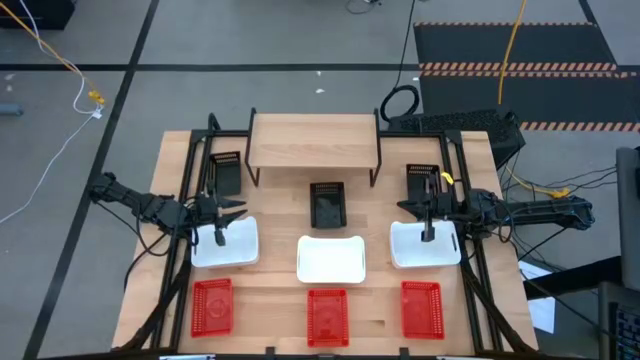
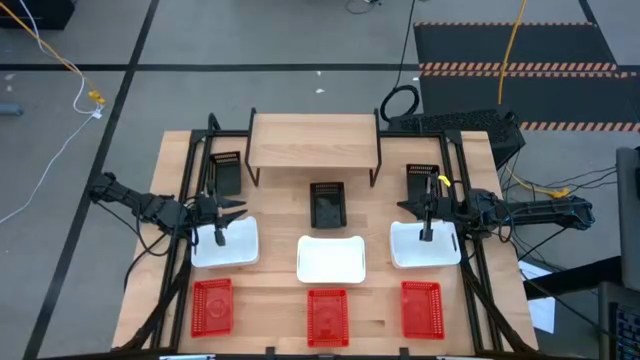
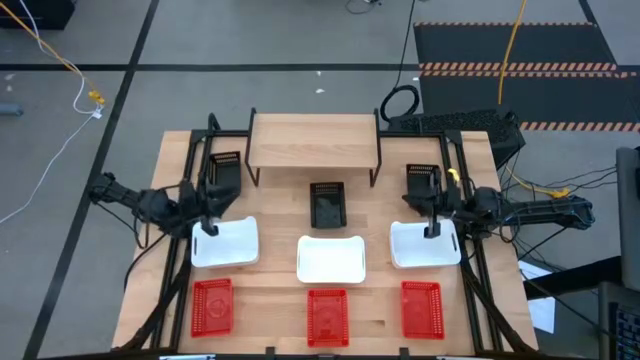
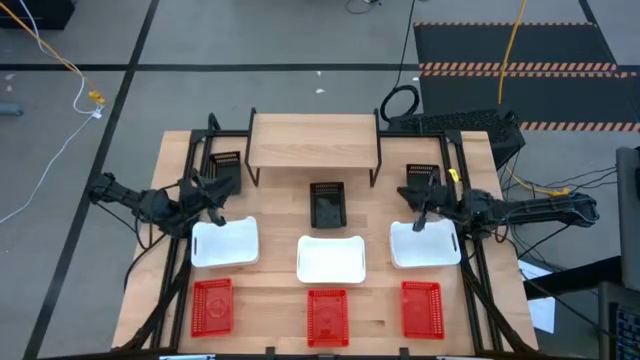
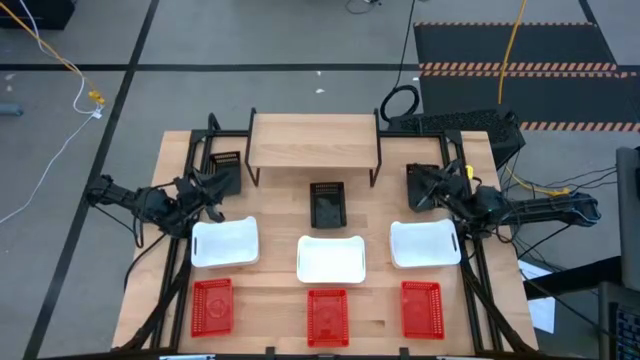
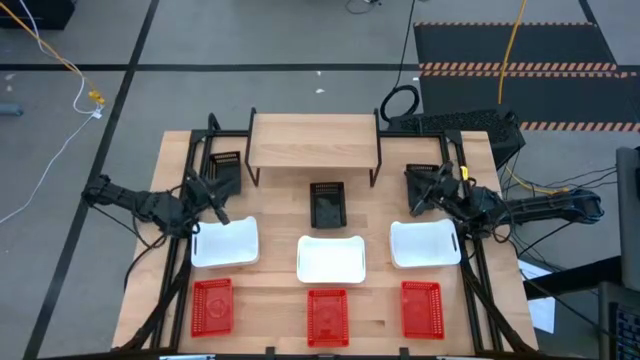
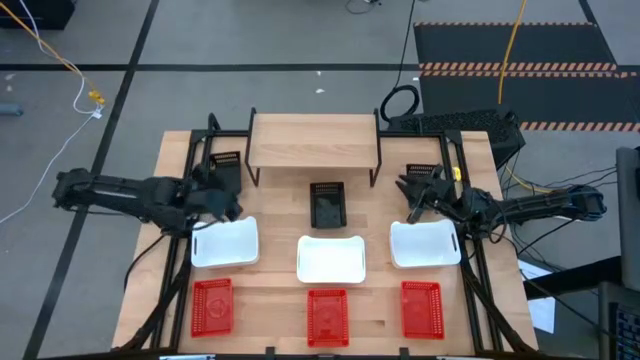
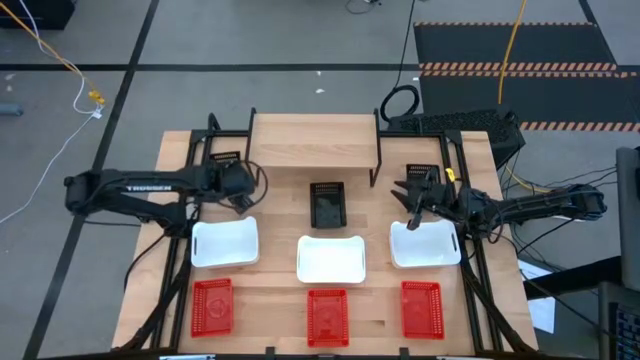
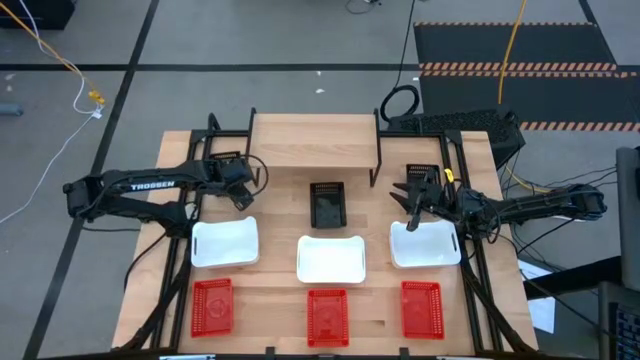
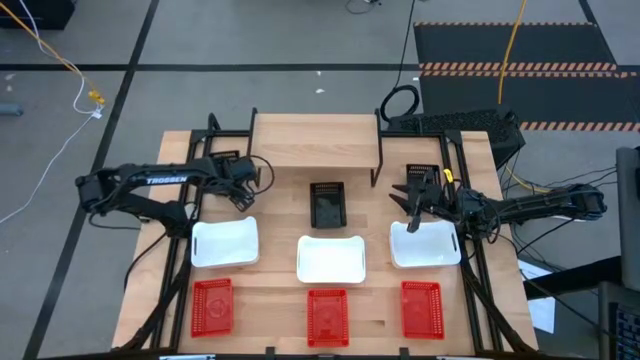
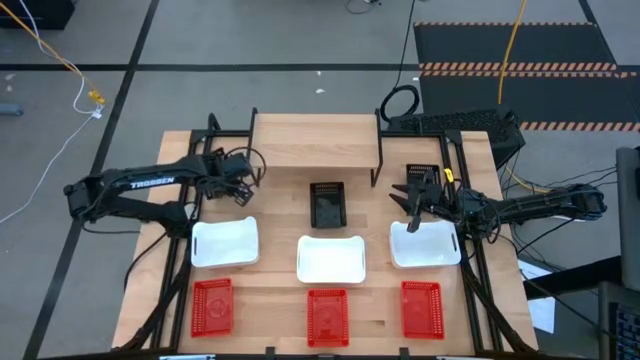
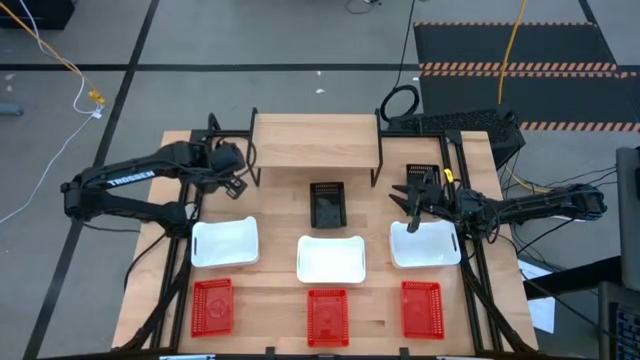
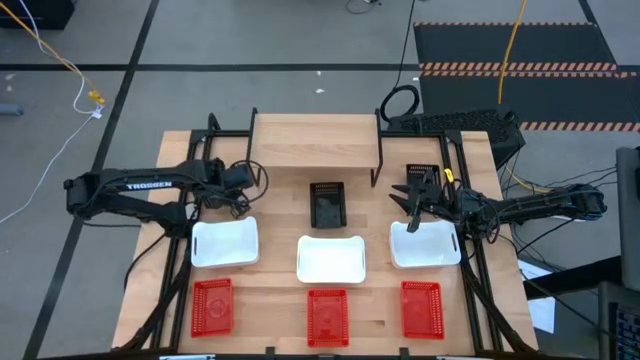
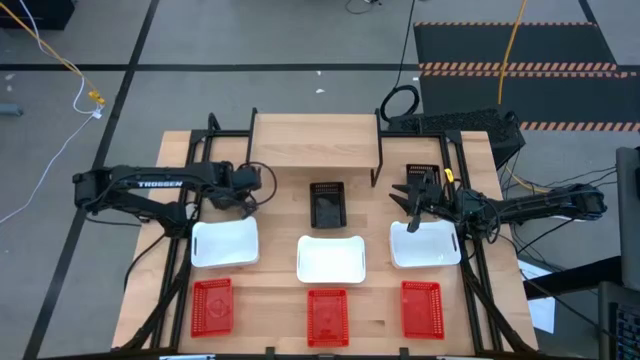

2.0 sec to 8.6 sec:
Task: Stack baskets on shelf by color
Put the left black bin on the shelf

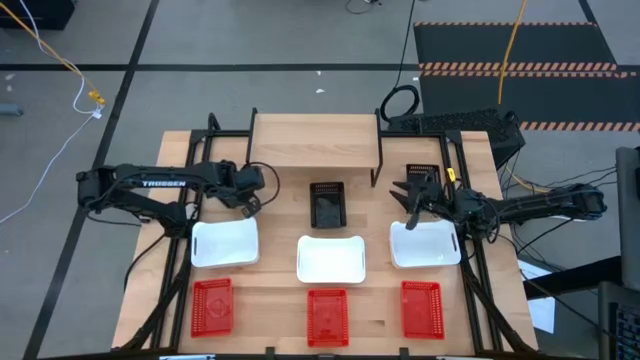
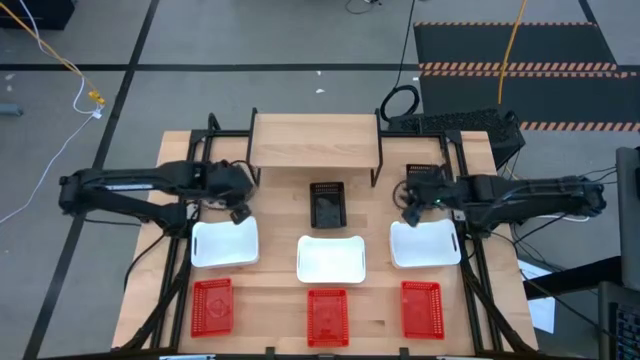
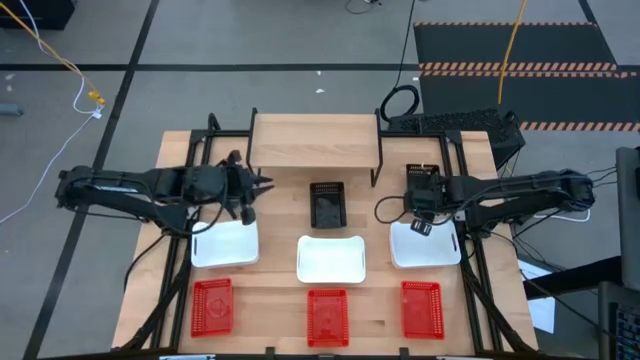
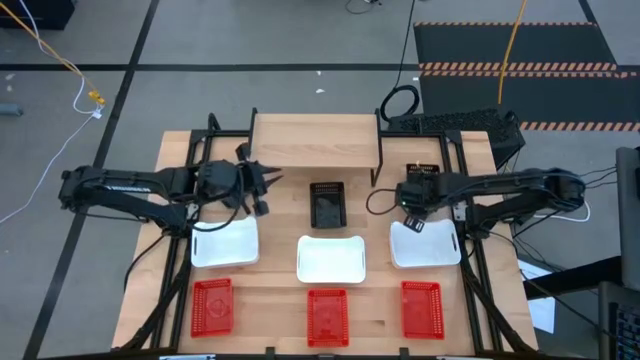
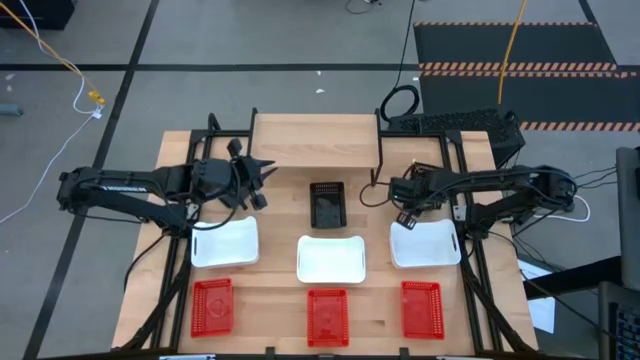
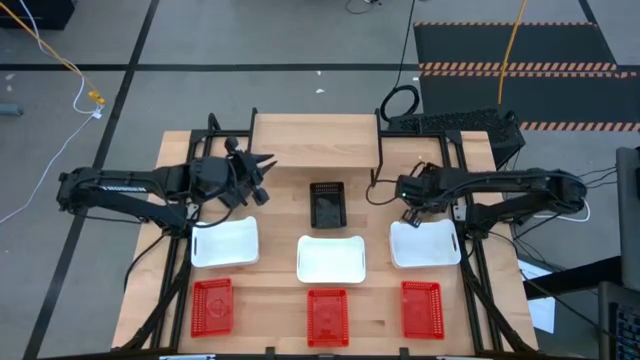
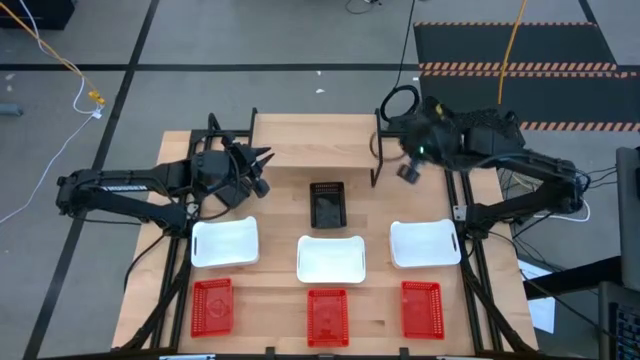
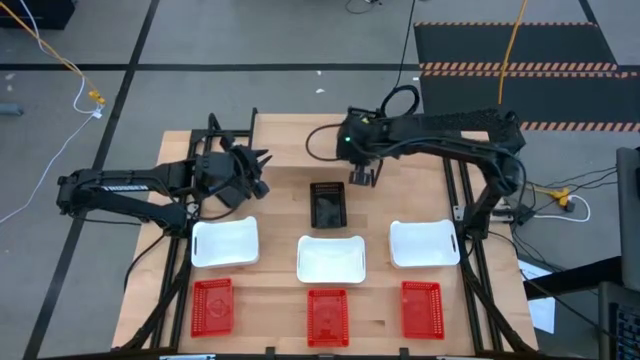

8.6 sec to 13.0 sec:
Put the right black bin on the shelf

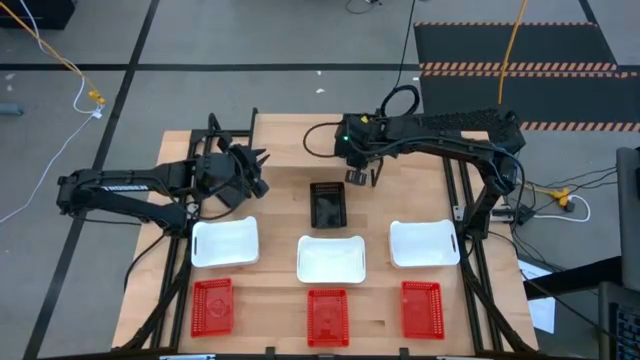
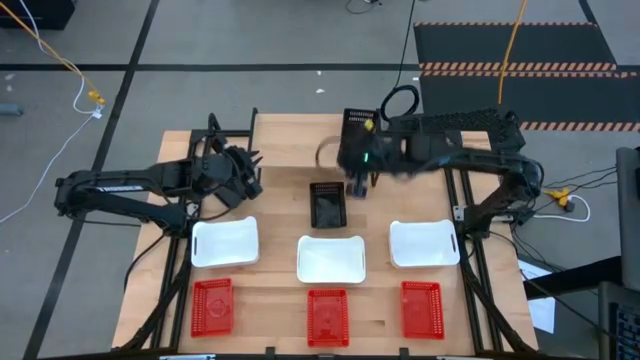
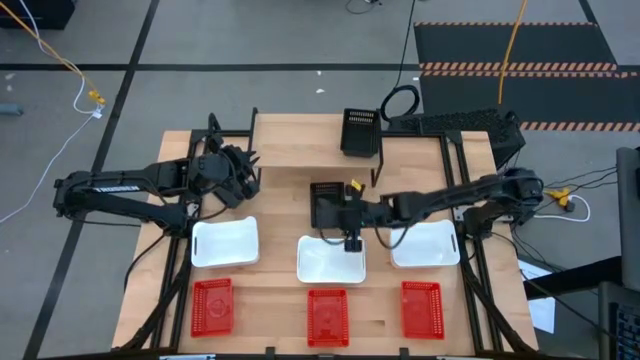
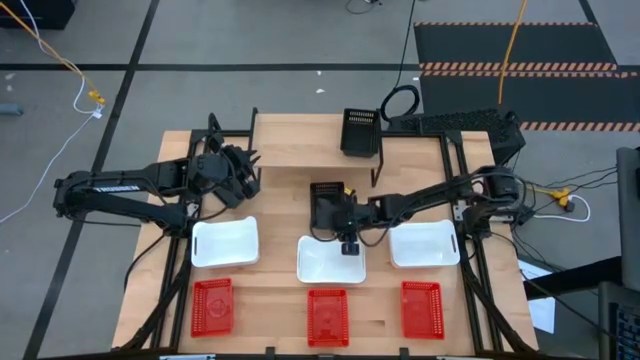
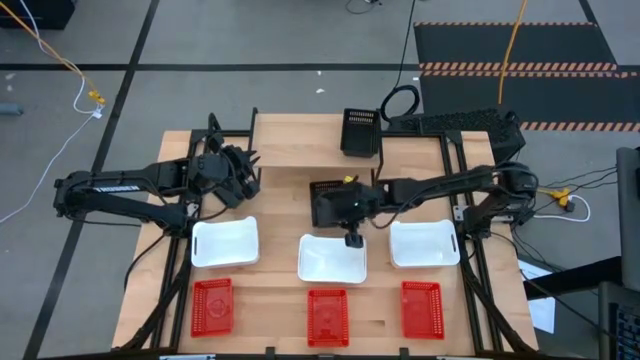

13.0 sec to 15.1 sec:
Stack the right black bin on the black bin on the shelf

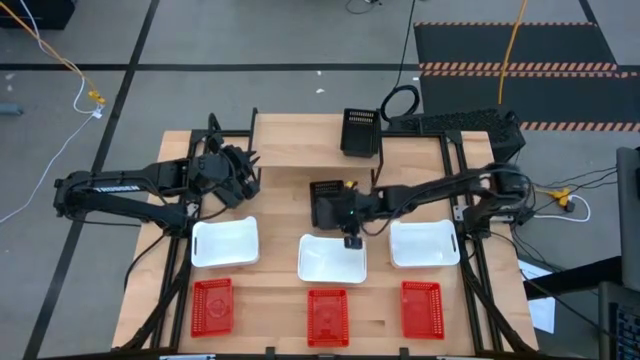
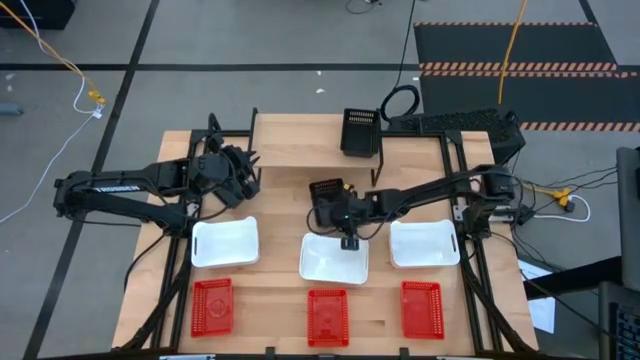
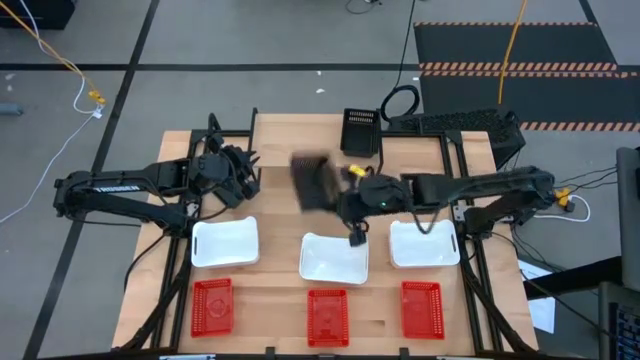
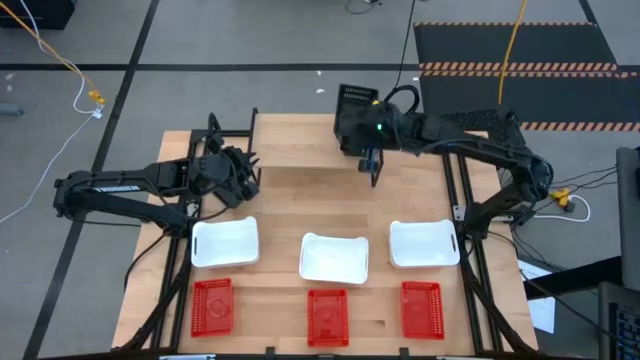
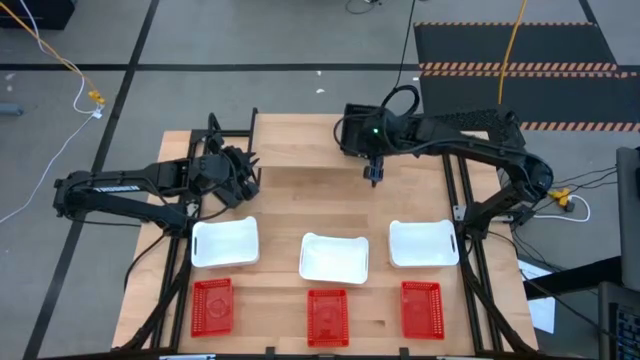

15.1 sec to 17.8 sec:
Stack the right black bin on the black bin on the shelf

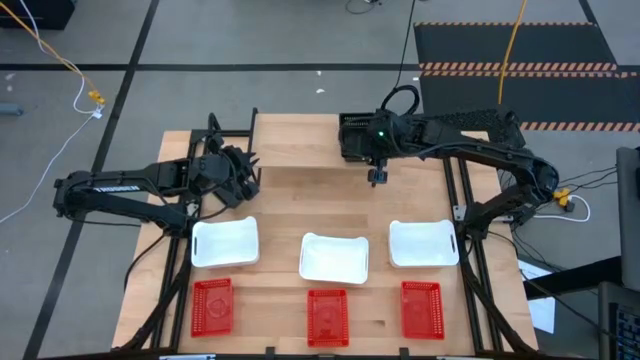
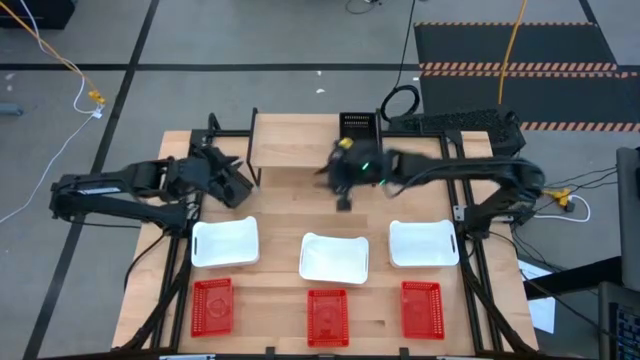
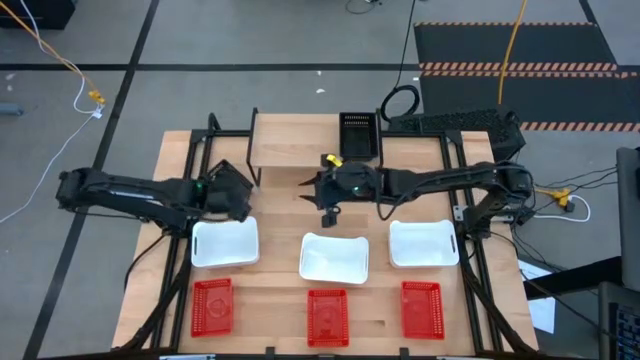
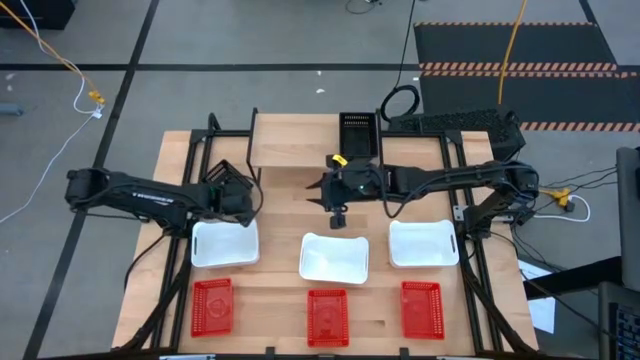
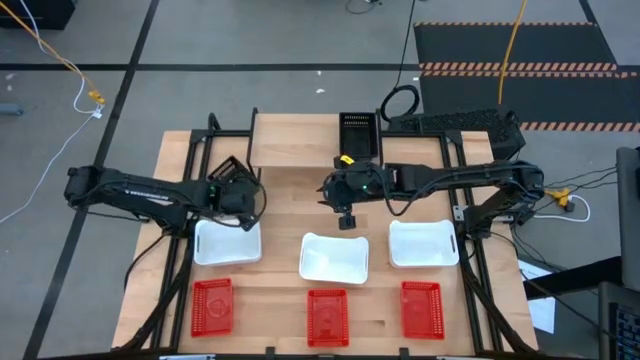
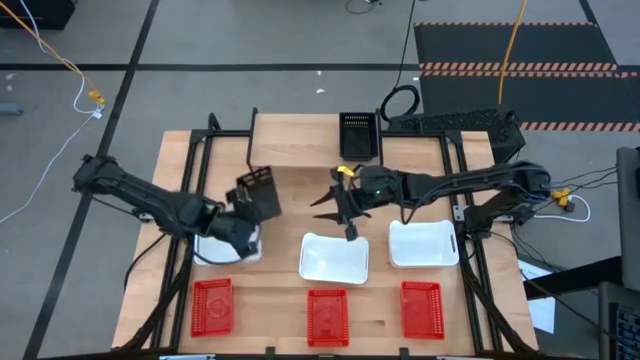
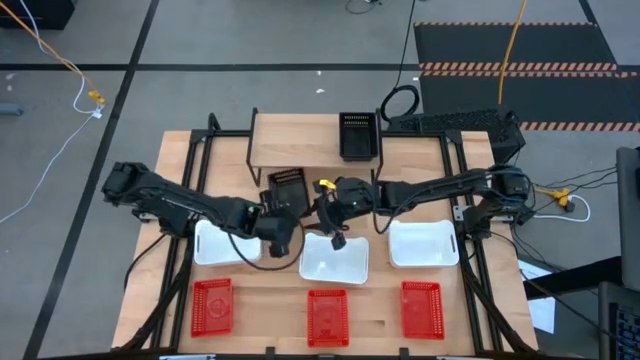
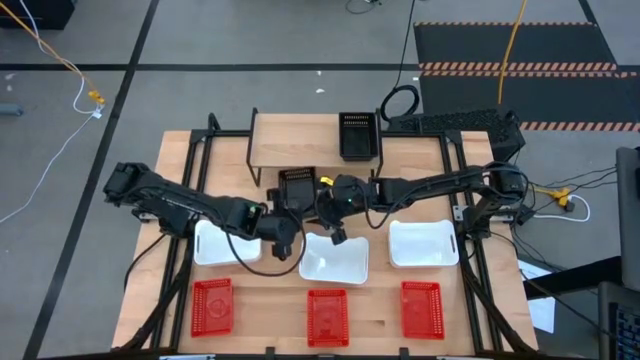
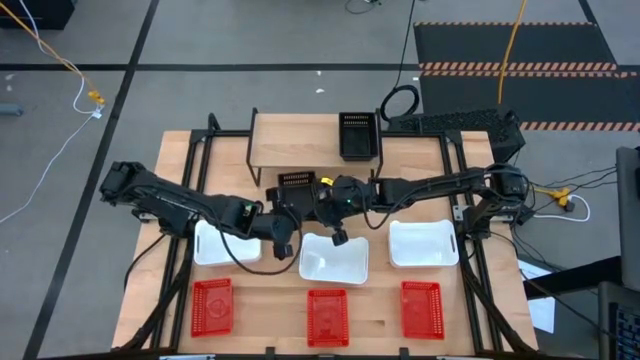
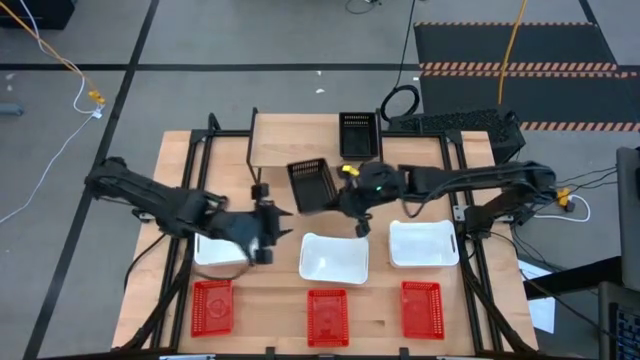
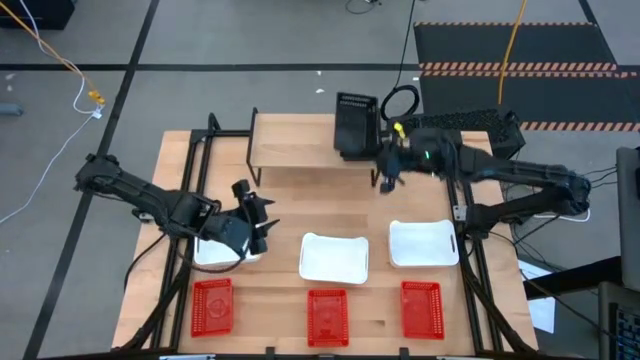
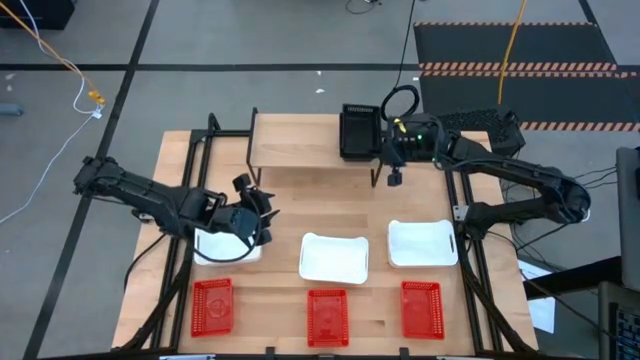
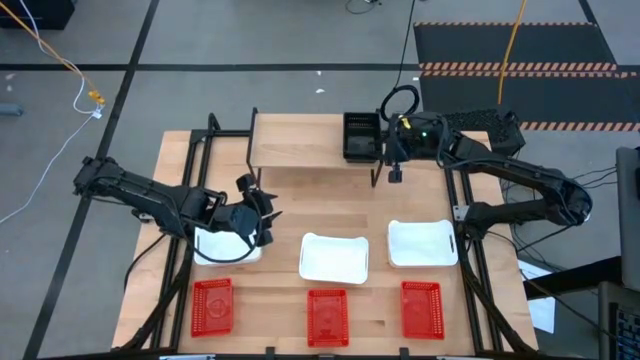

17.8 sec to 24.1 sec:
Stack the black bin on the stacked black bins on the shelf
